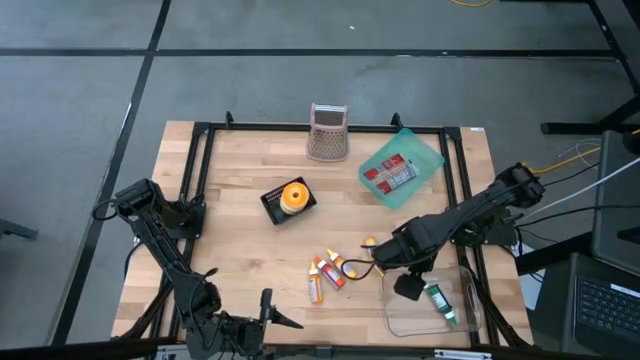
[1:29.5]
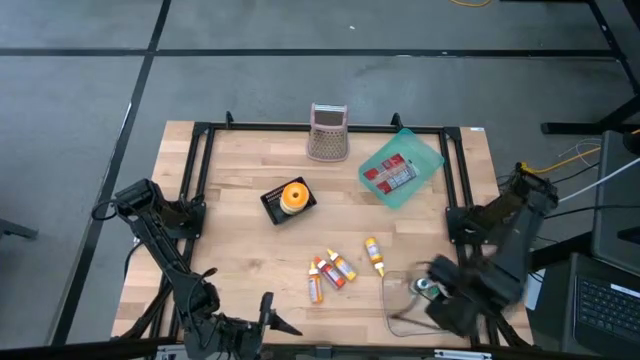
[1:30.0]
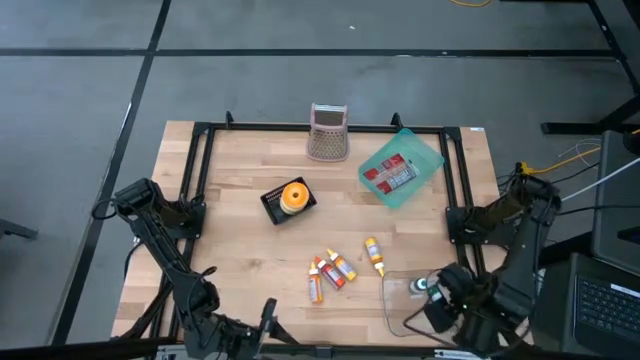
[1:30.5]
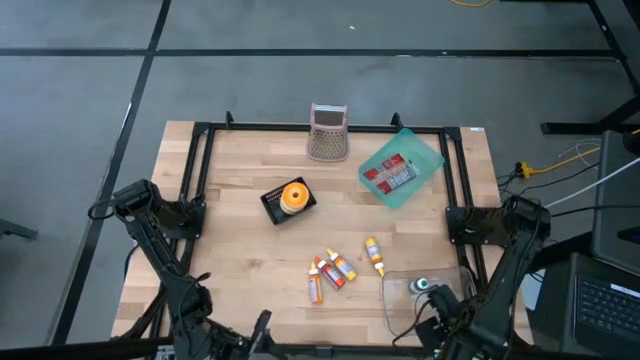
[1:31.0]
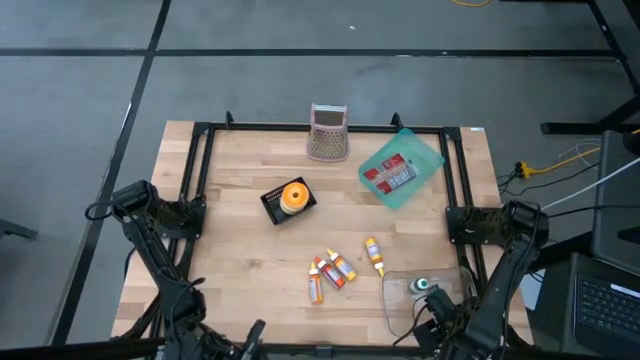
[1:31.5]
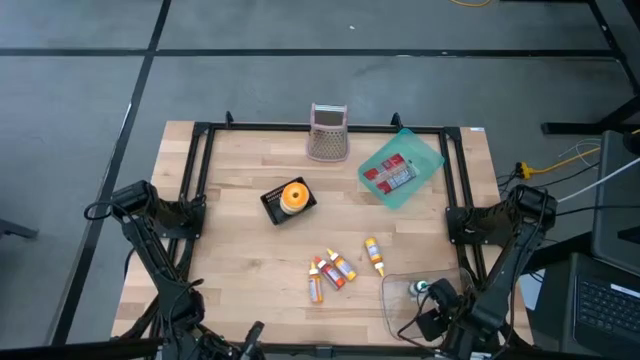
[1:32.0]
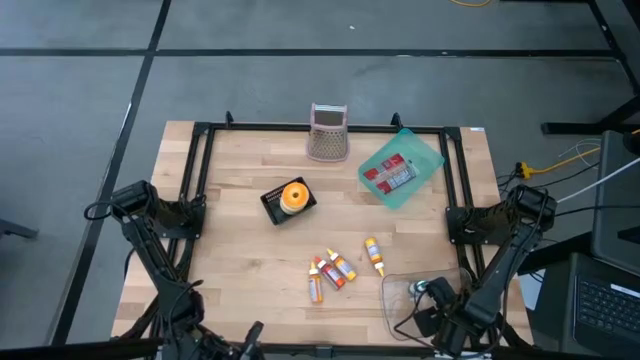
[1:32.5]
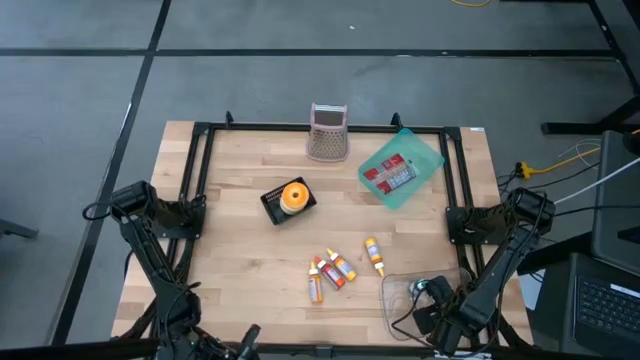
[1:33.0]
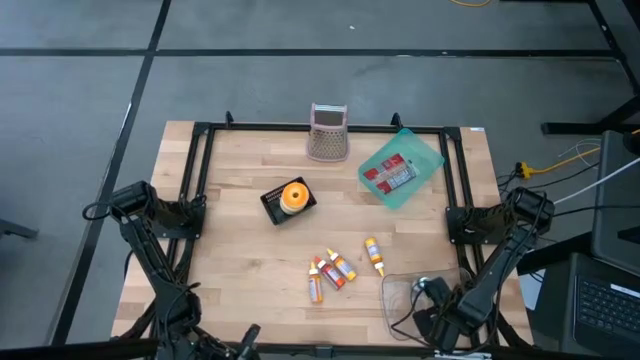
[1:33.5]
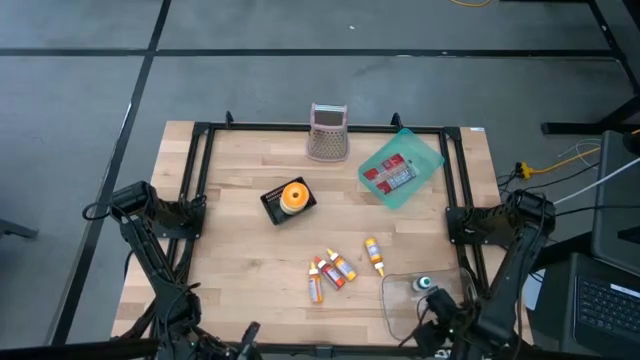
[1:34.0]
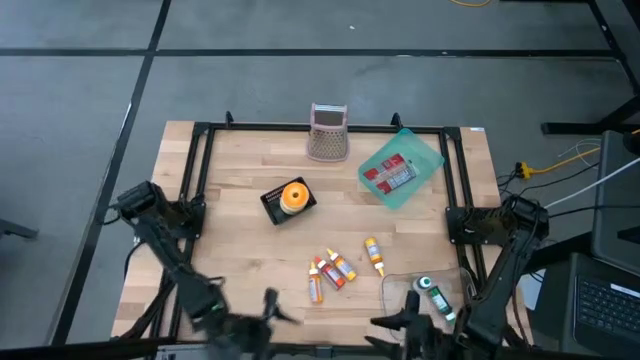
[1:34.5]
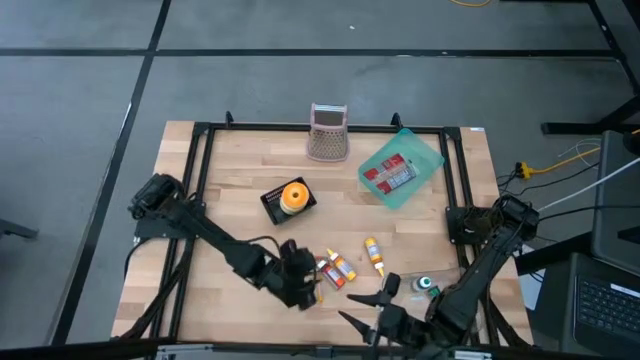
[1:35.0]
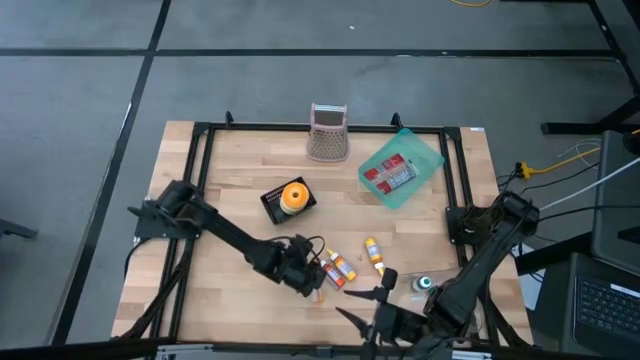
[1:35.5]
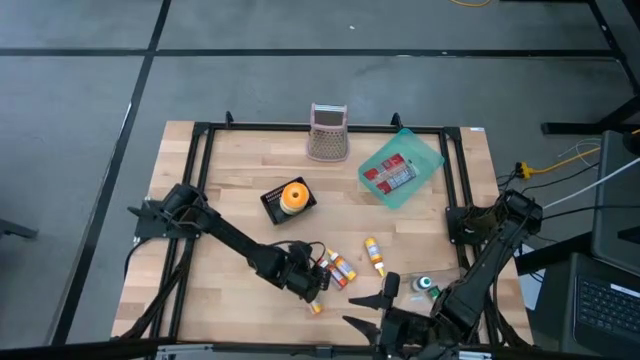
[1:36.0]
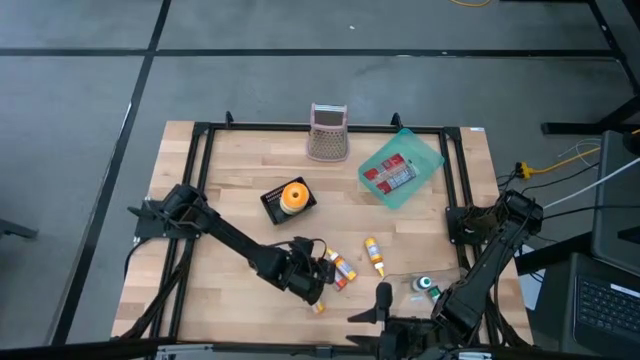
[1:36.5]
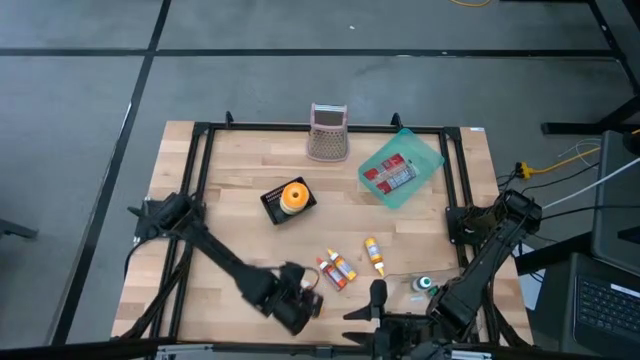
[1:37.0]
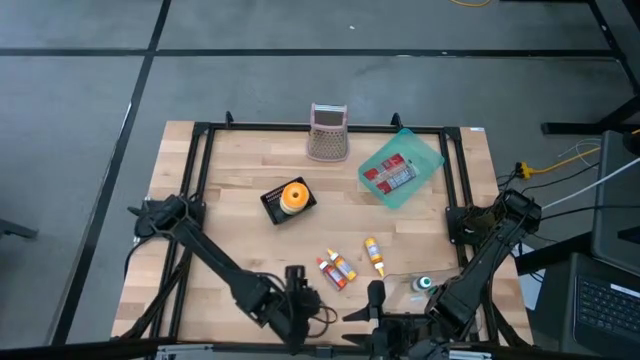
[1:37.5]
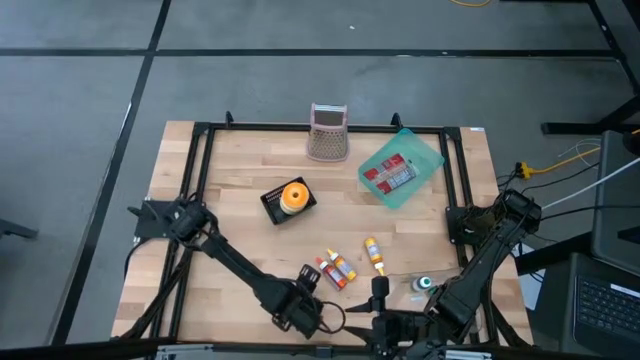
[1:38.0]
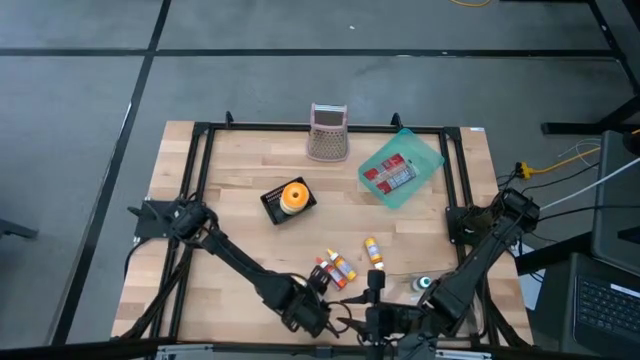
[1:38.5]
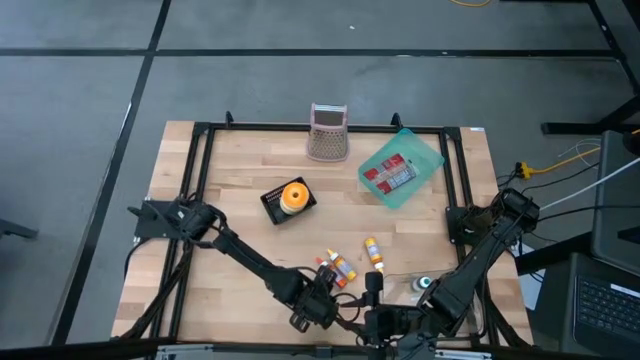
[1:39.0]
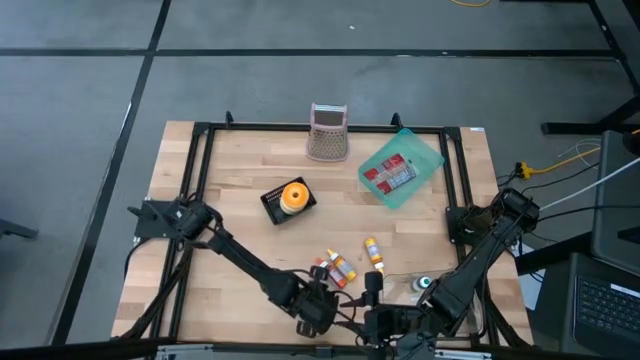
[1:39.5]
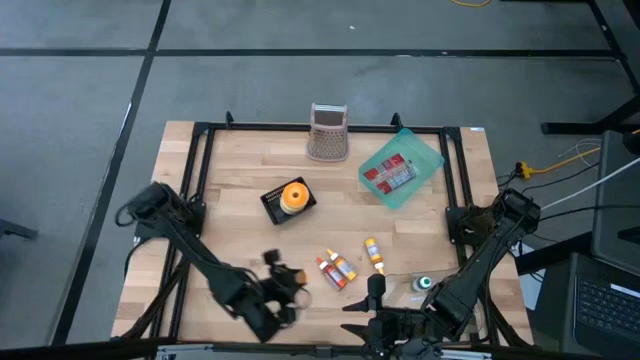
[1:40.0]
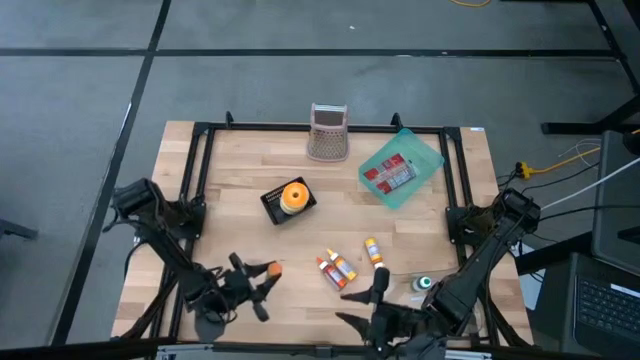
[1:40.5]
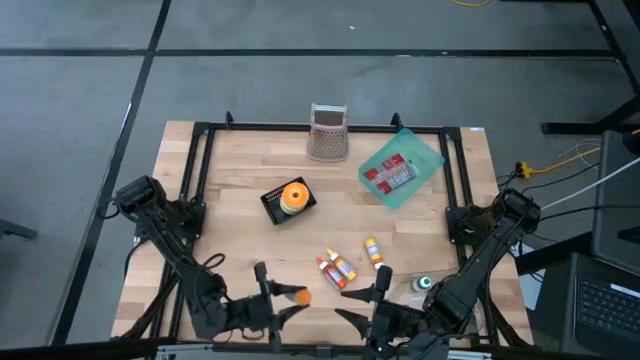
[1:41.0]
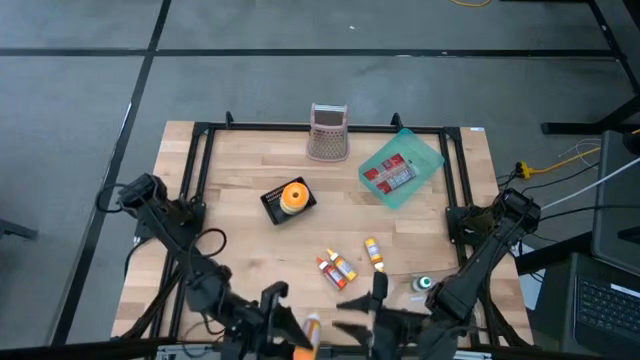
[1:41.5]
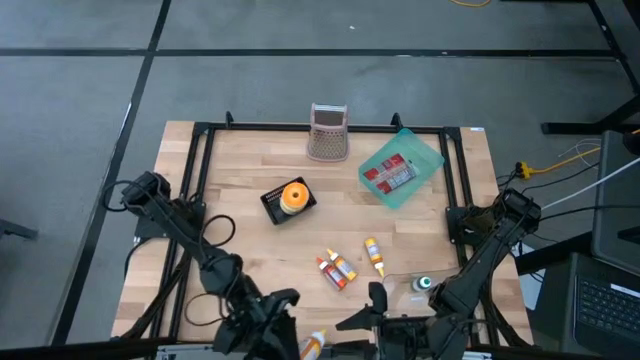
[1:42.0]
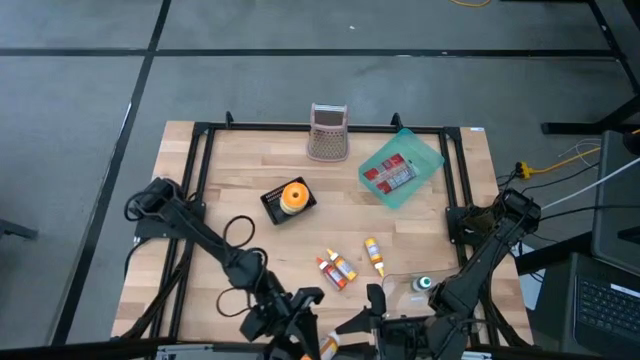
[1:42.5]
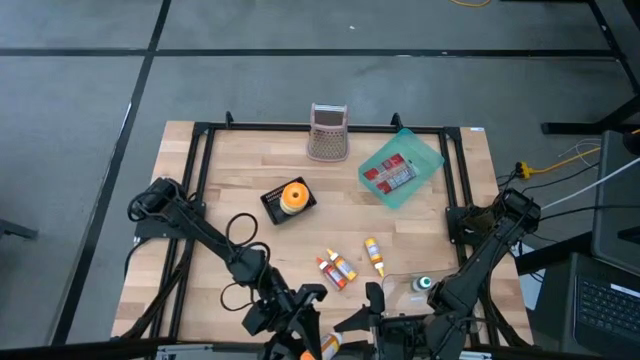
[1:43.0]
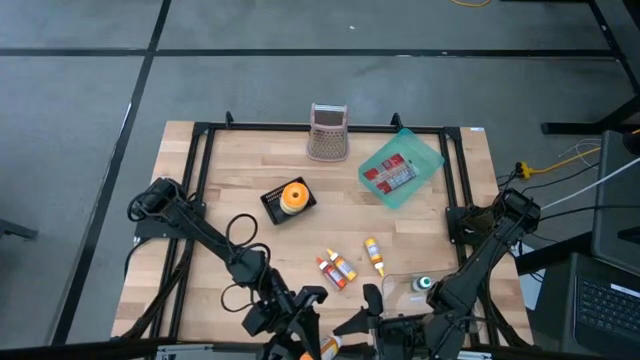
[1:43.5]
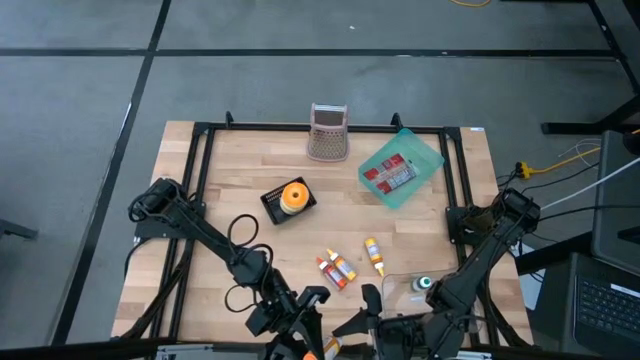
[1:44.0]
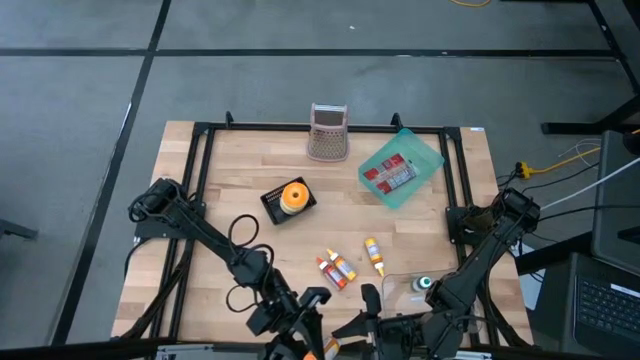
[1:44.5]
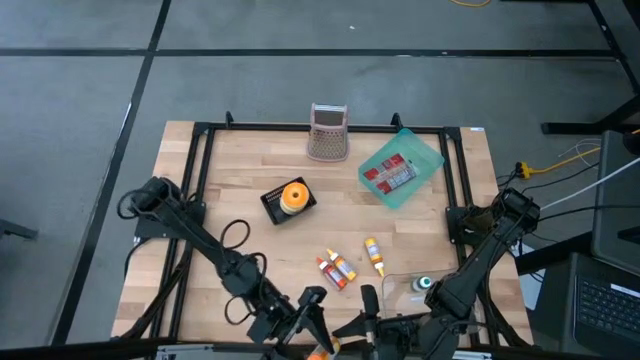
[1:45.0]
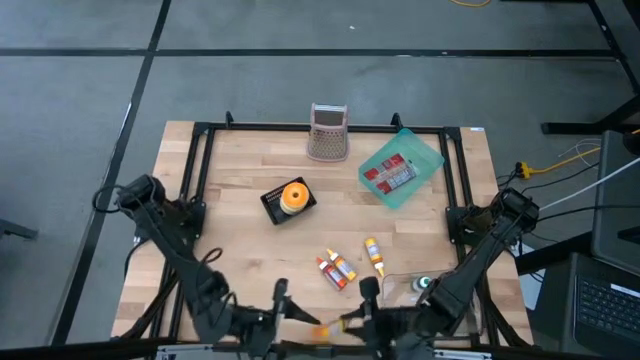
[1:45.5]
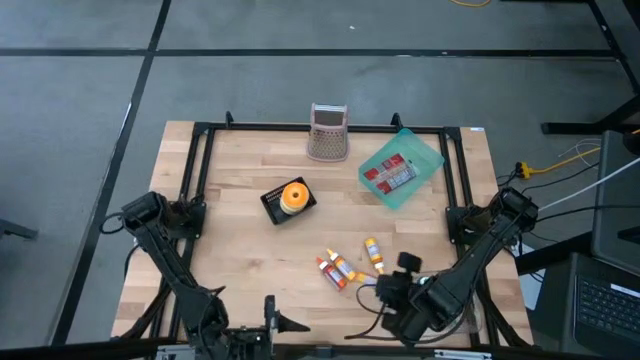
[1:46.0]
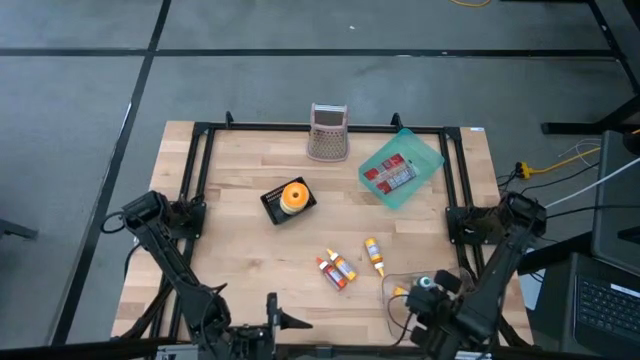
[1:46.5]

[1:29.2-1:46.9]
Task: Pick & Place Food Item
Put the left yellow food coloring bottle into the transparent bin

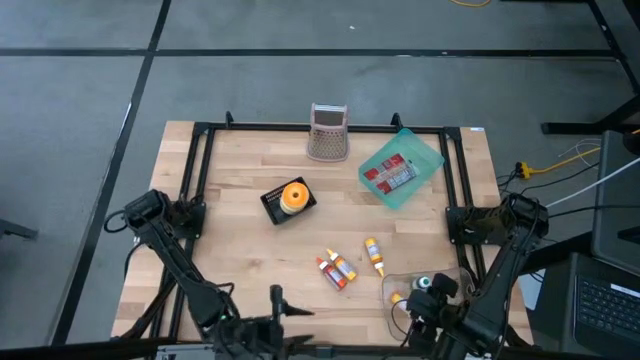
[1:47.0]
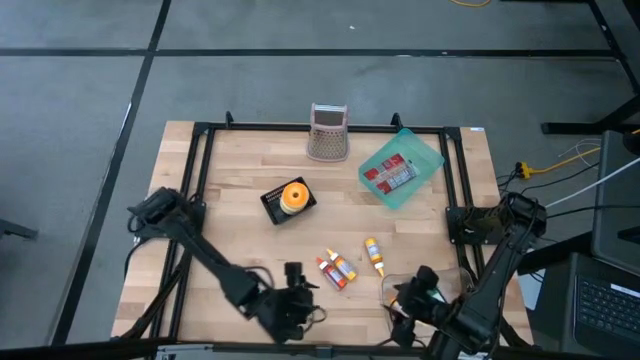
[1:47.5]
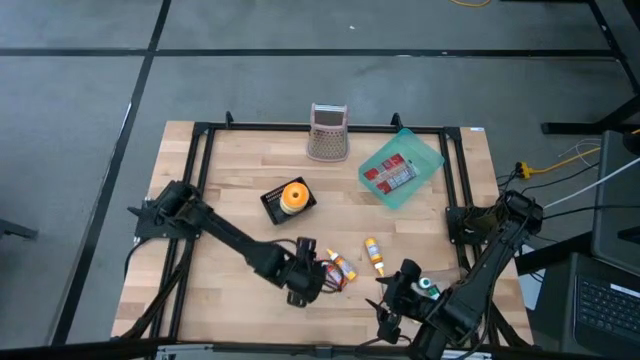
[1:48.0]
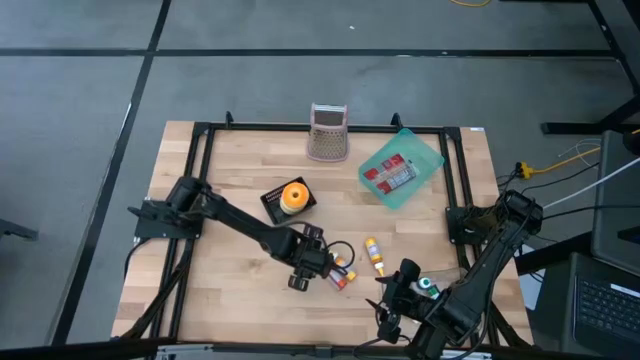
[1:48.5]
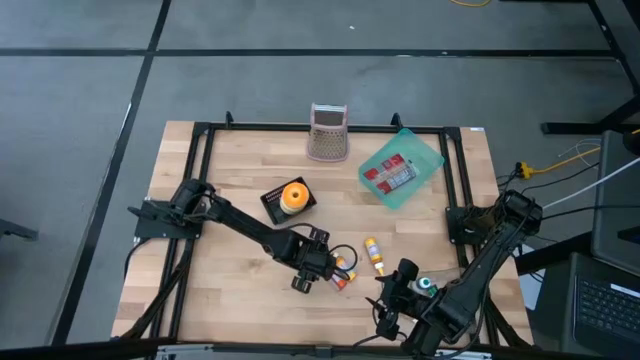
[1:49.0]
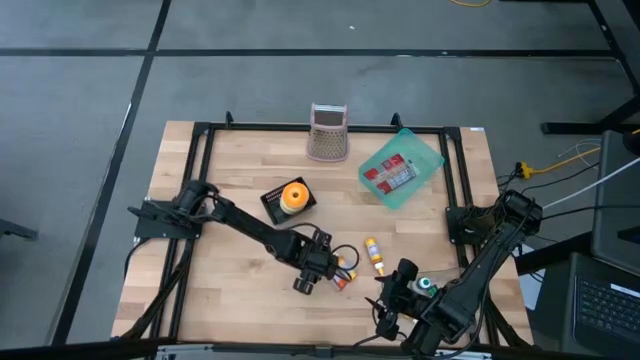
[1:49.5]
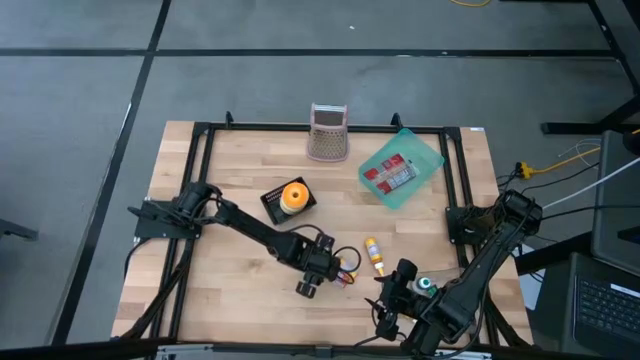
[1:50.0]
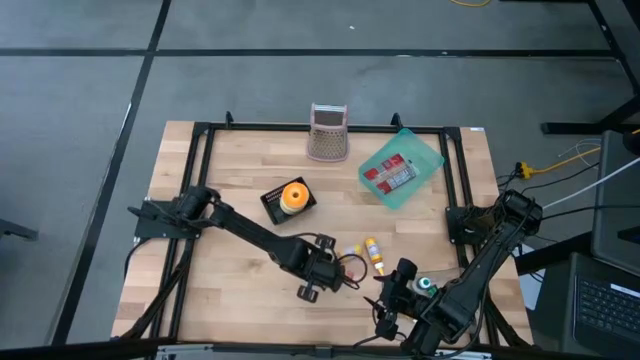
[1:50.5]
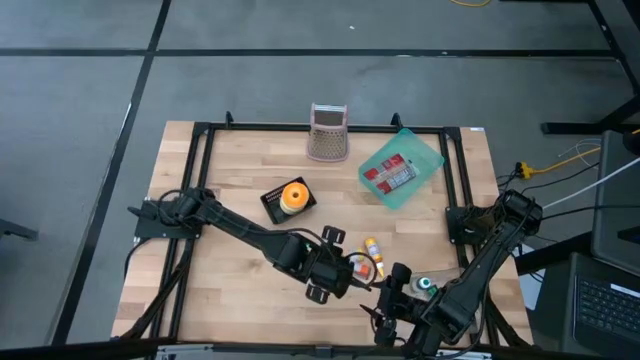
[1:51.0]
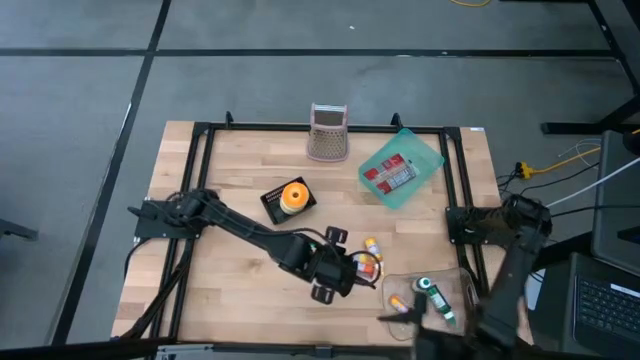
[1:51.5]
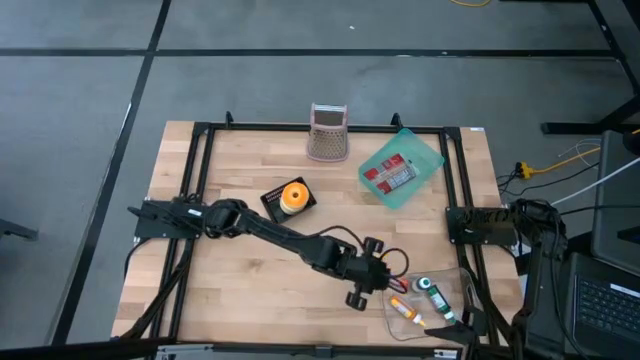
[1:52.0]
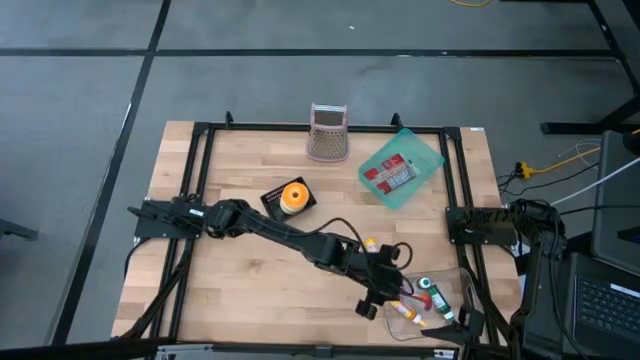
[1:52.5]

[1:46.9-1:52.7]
Put the orange food coloring bottle into the transparent bin
